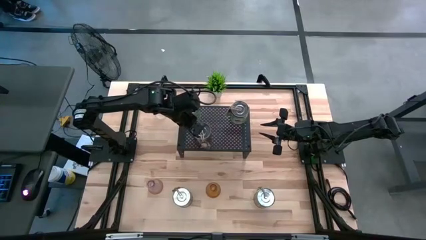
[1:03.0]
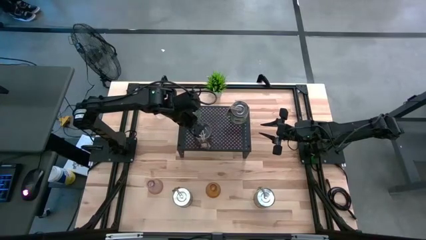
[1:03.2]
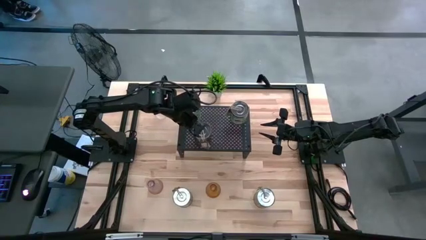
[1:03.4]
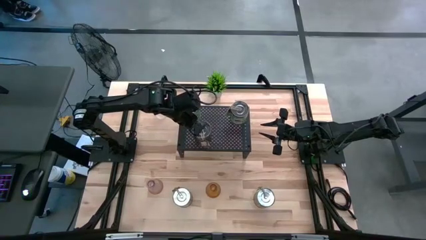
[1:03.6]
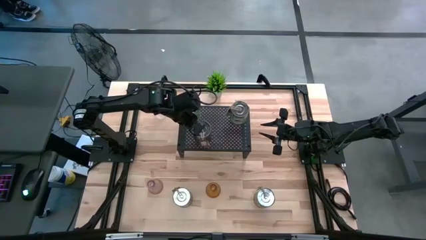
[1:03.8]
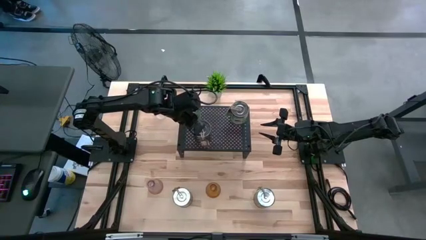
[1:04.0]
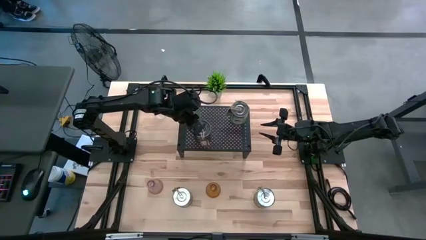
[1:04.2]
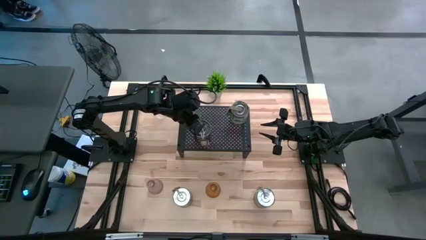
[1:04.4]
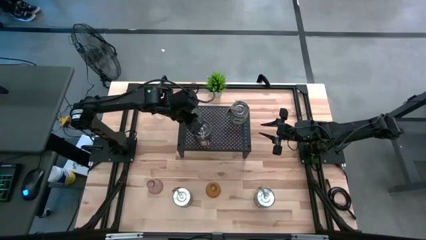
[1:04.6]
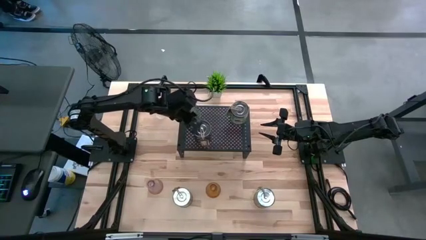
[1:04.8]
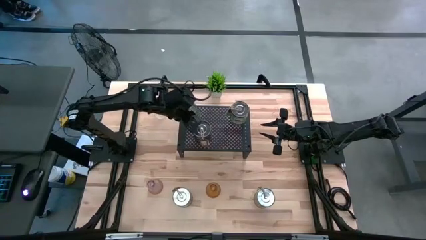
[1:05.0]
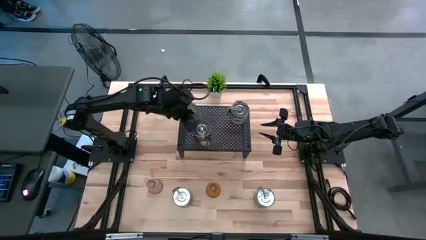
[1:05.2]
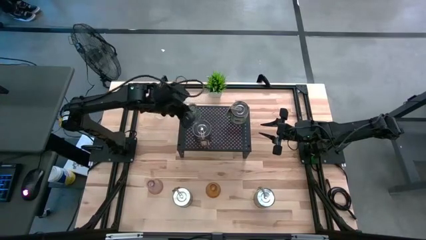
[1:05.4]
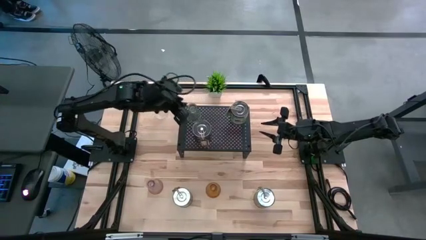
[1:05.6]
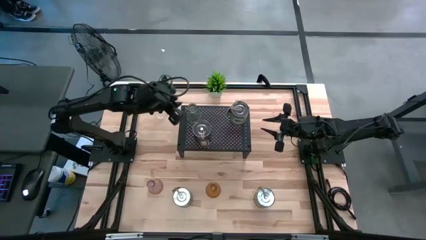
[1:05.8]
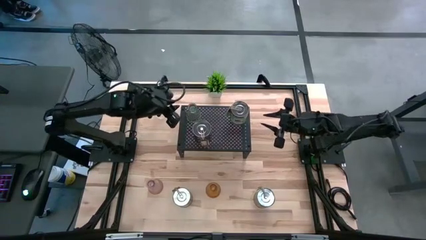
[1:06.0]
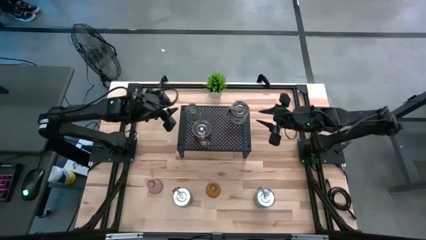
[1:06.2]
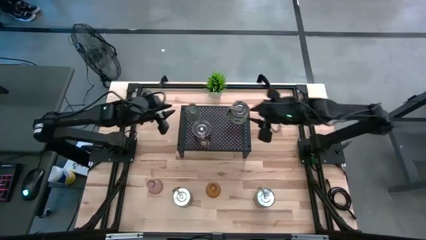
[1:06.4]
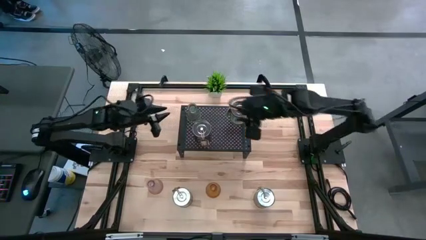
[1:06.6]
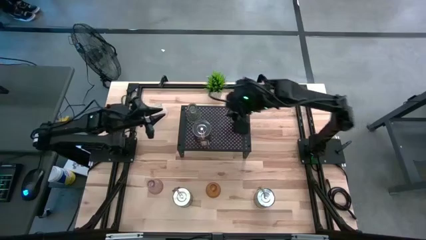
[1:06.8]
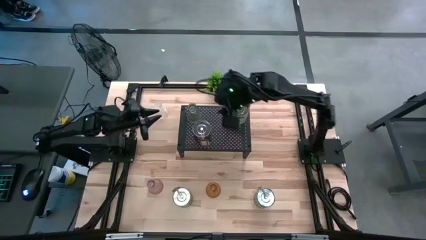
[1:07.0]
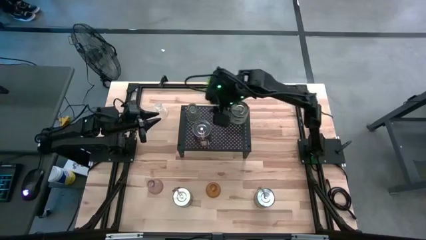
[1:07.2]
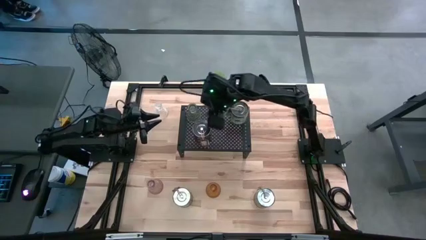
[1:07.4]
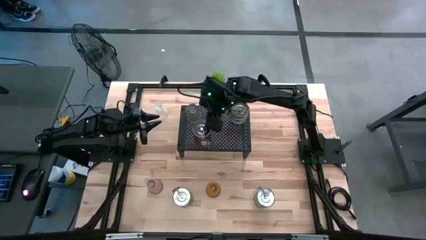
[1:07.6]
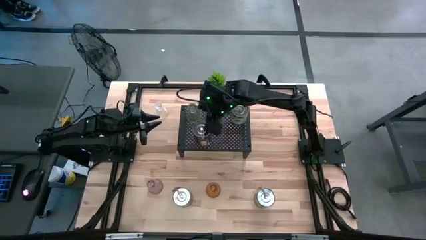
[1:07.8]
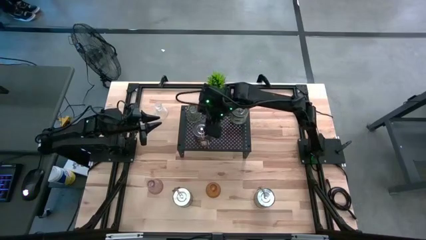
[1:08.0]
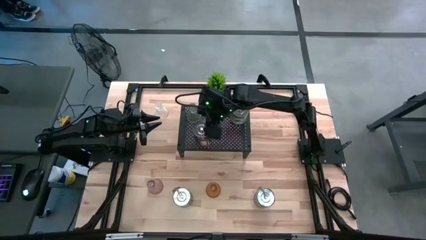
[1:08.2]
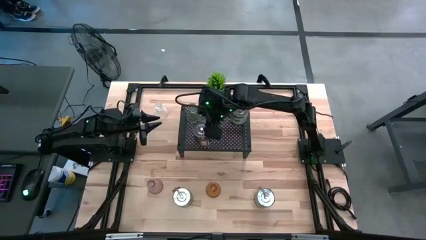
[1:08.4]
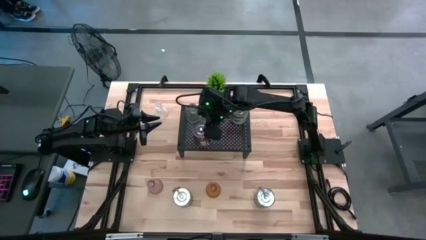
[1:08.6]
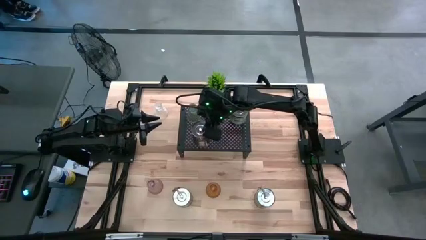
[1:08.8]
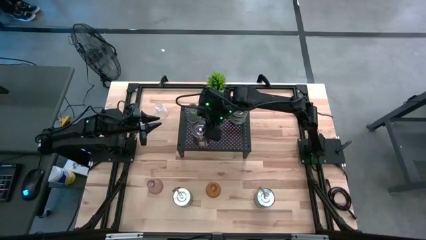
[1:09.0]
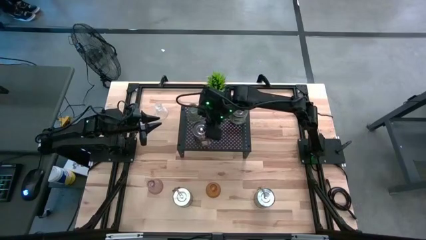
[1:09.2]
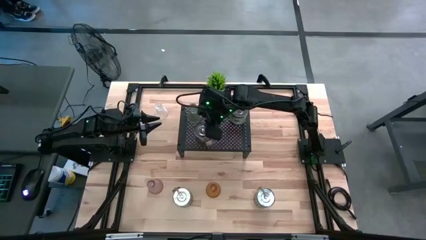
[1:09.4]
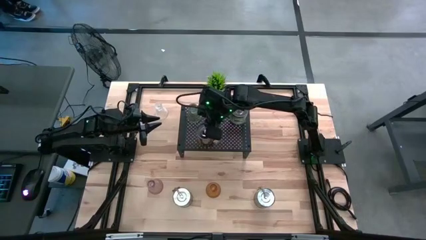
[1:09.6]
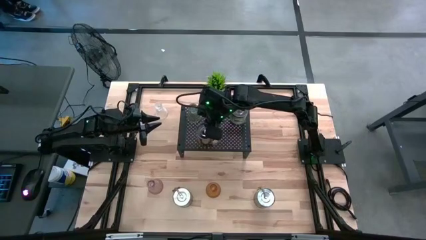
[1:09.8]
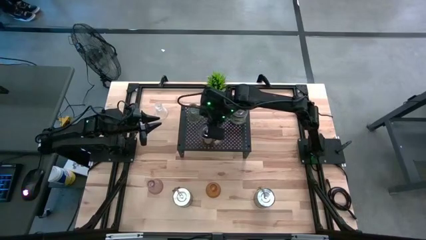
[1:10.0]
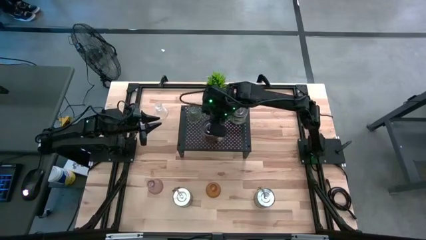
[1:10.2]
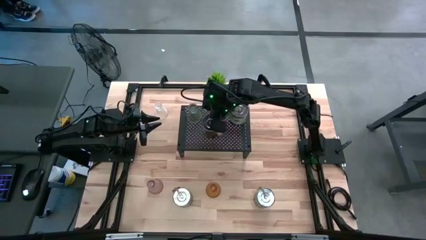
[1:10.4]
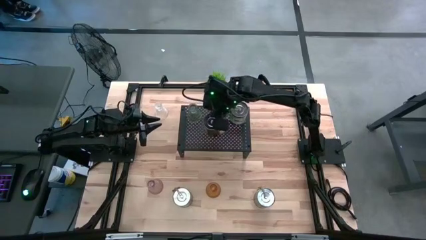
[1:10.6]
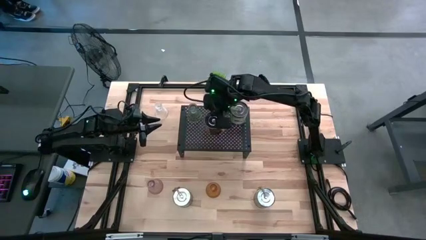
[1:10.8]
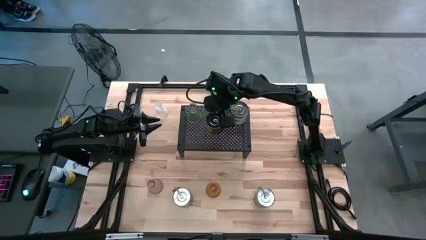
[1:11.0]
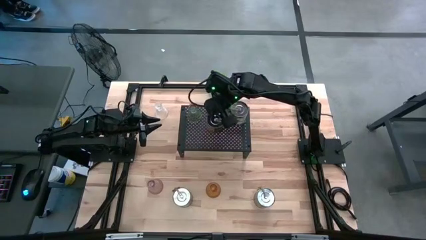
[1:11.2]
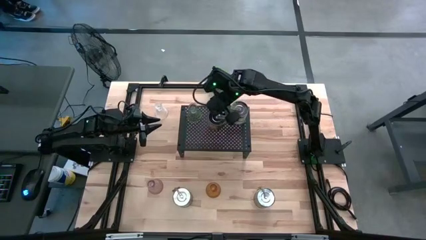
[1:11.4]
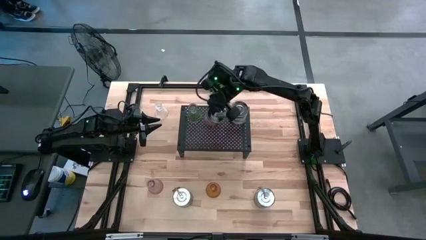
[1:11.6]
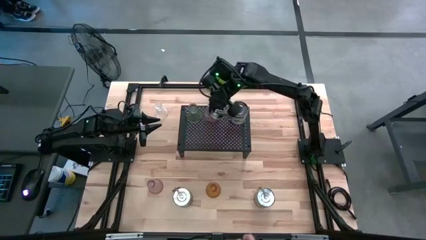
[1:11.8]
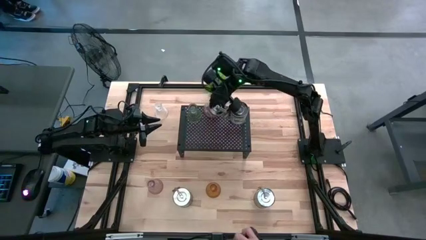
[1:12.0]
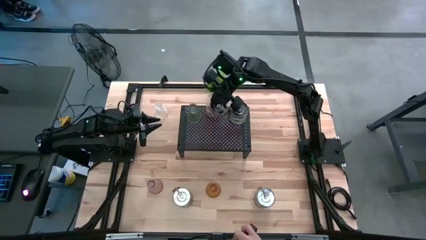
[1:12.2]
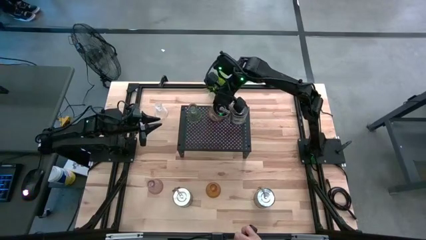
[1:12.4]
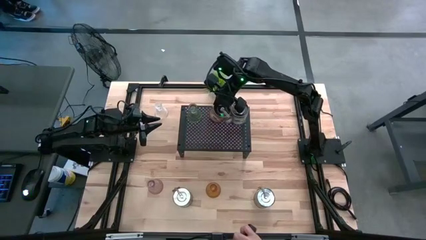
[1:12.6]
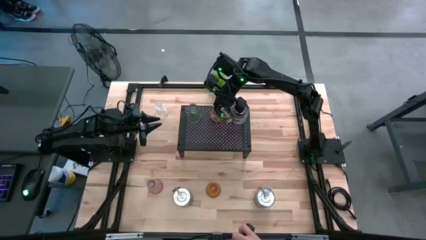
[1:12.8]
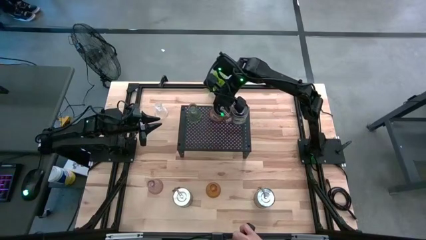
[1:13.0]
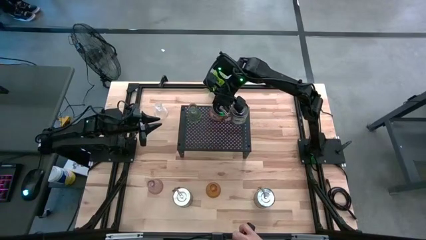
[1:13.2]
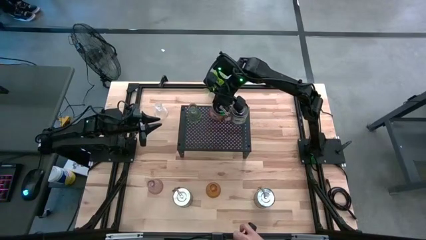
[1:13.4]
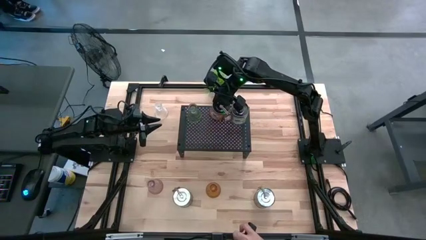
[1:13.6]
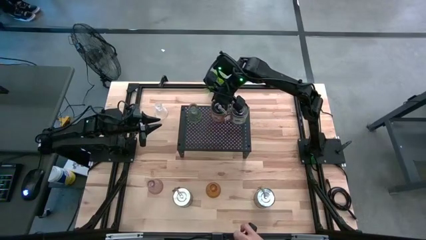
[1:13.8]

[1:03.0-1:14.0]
Task: Pick & Place candle stick holders
Put the orange scented candle on the shelf

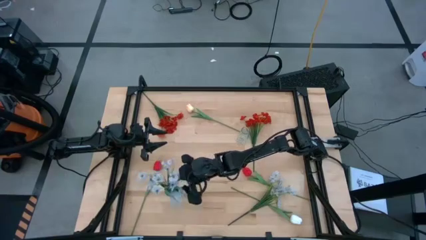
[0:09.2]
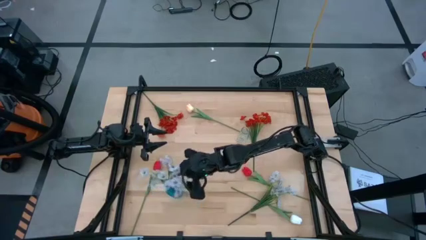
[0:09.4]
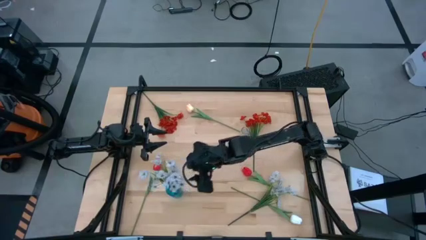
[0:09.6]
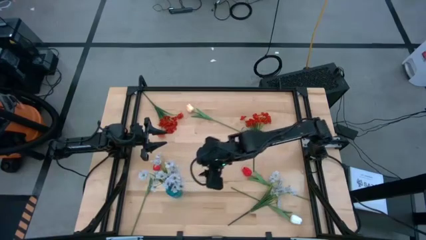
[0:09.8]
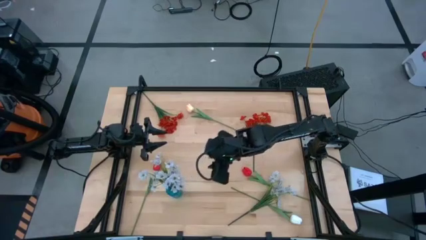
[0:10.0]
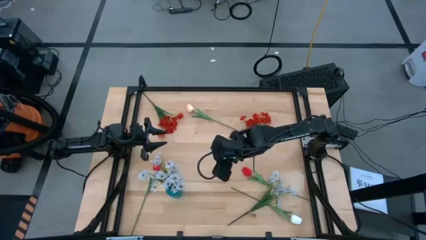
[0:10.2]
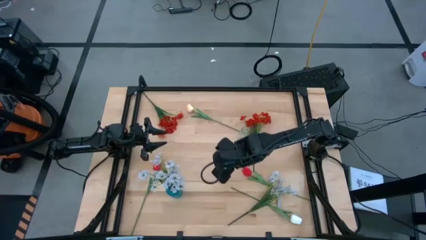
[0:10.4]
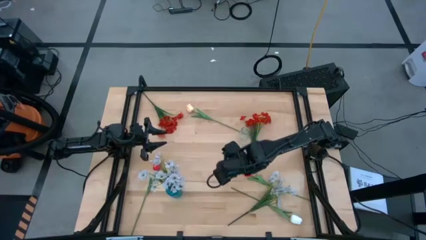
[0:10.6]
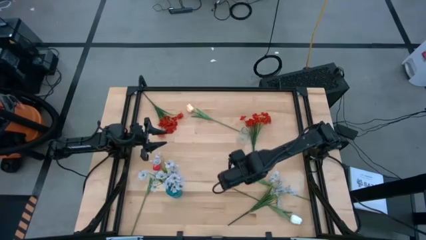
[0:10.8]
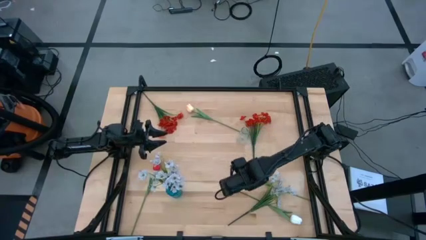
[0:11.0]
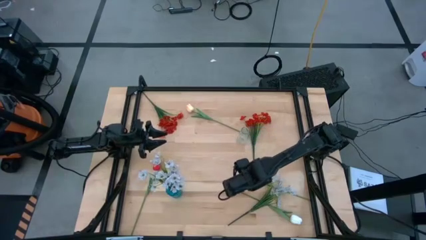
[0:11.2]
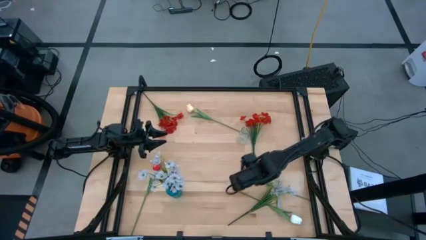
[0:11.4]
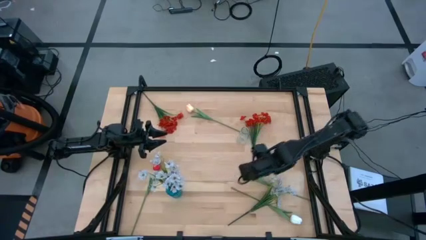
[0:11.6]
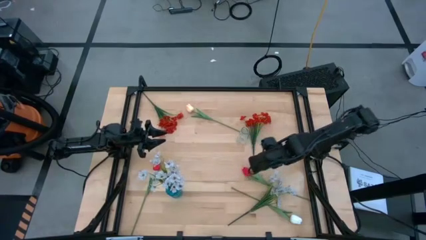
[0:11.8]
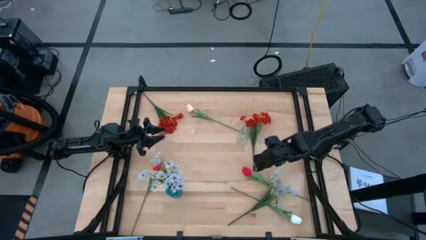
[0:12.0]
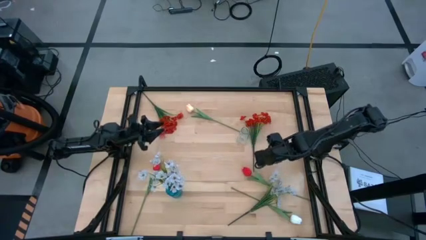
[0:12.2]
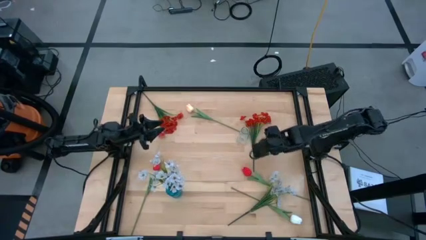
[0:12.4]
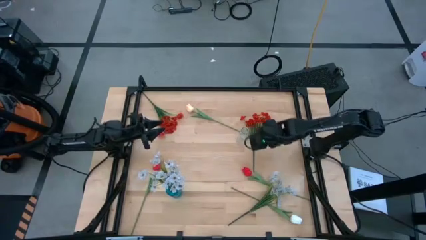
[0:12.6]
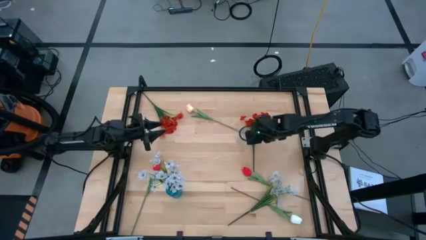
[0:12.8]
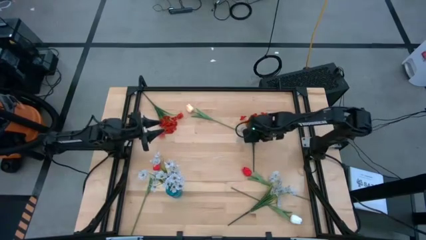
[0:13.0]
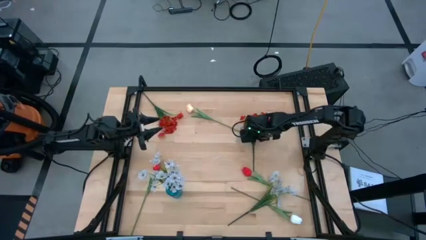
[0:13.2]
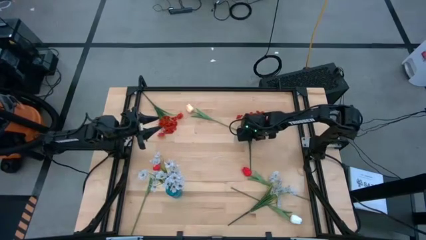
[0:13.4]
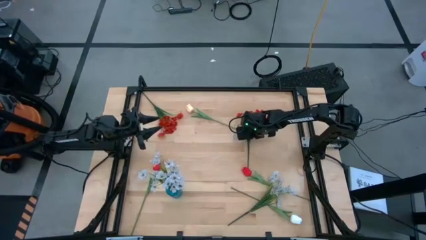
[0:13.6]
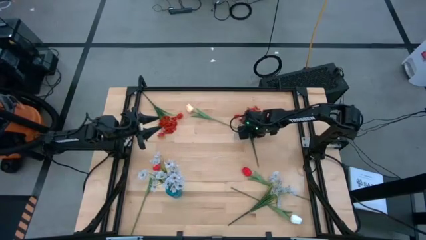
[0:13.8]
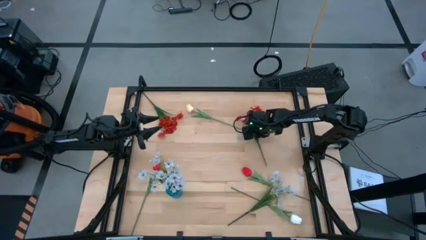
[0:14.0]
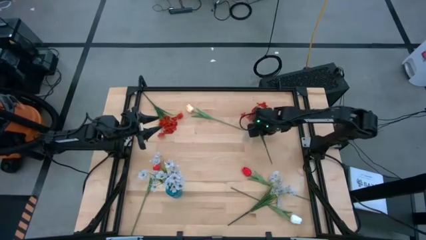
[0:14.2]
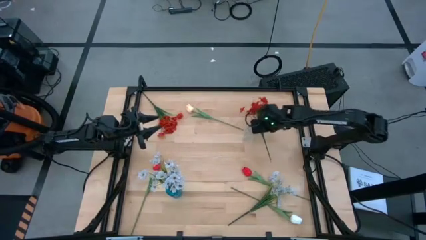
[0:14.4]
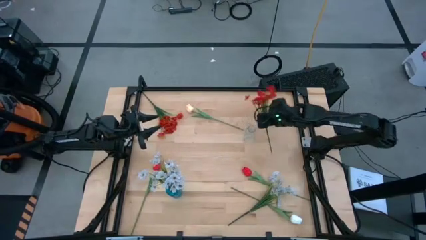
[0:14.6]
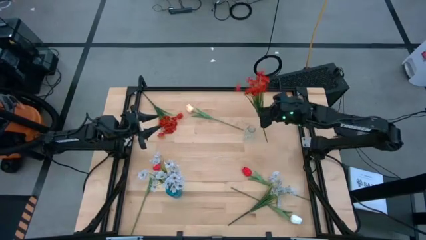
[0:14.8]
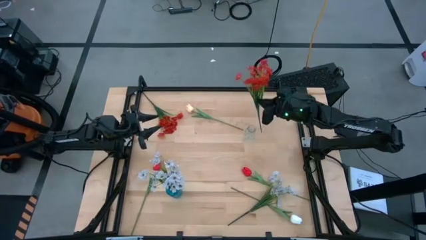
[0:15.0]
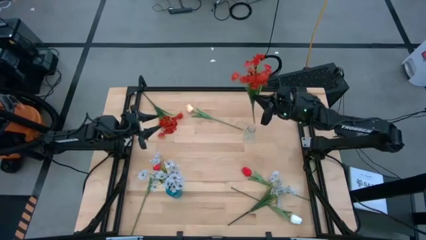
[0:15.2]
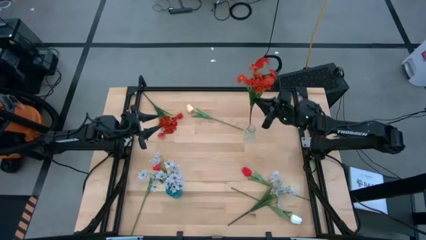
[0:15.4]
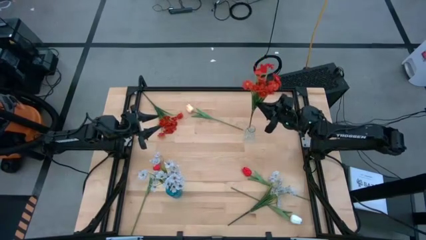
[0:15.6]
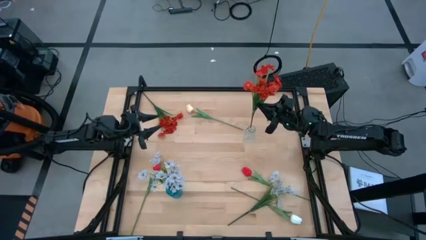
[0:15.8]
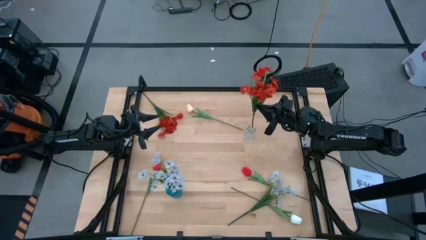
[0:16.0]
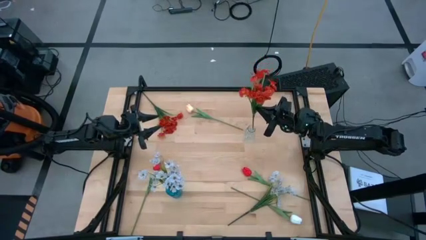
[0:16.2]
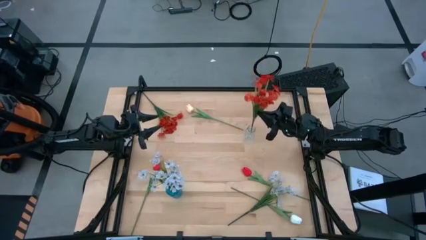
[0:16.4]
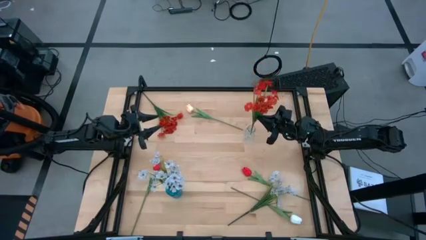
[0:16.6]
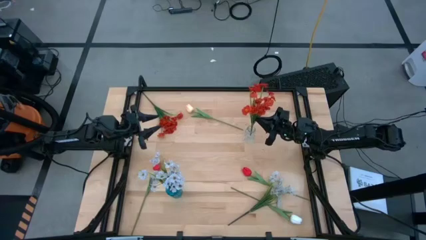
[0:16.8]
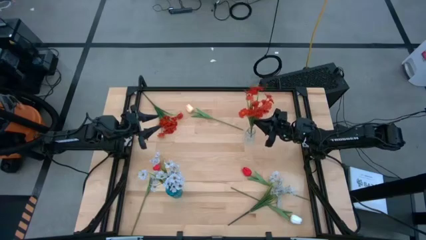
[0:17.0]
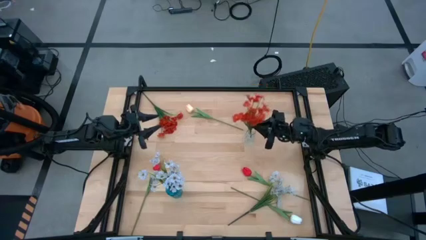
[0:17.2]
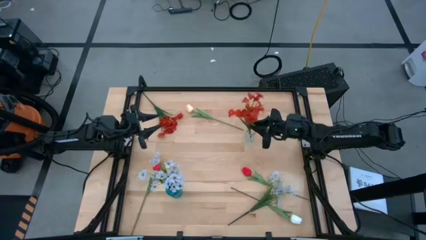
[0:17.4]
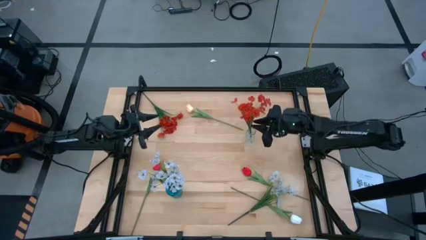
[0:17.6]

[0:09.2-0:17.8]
Task: Sort flowers into vase by color
Put the right red flowers into the transparent flower vase
